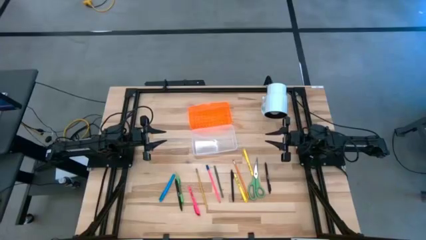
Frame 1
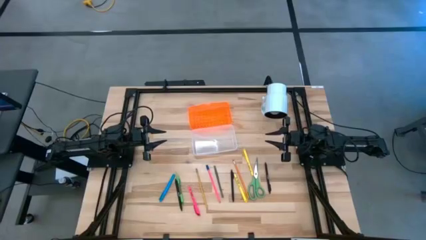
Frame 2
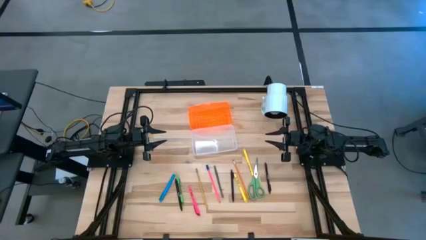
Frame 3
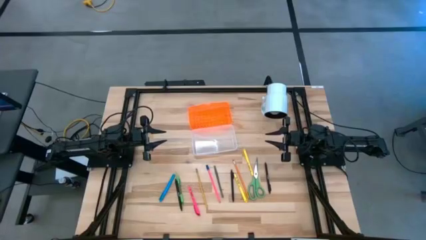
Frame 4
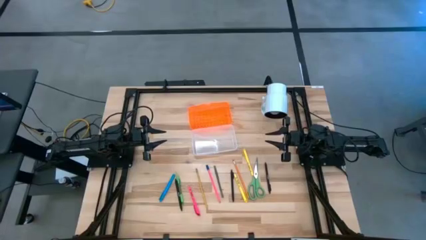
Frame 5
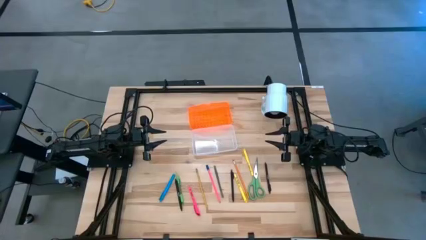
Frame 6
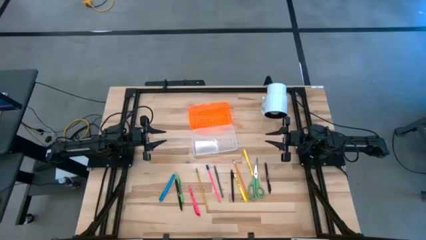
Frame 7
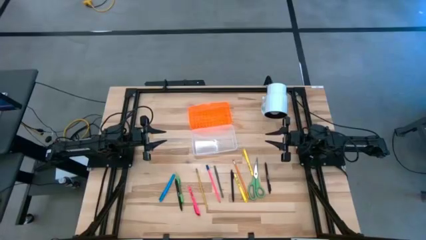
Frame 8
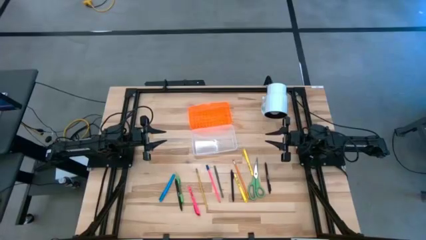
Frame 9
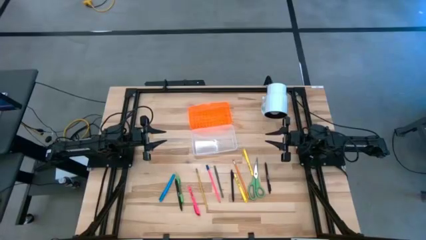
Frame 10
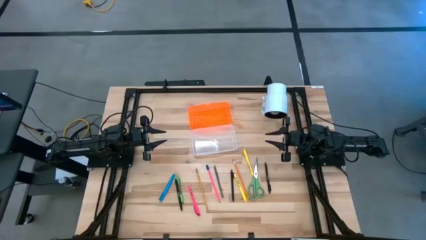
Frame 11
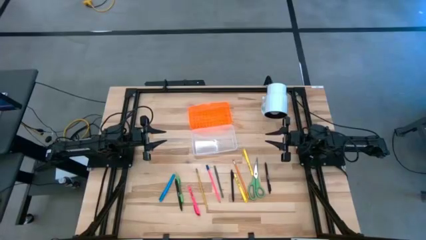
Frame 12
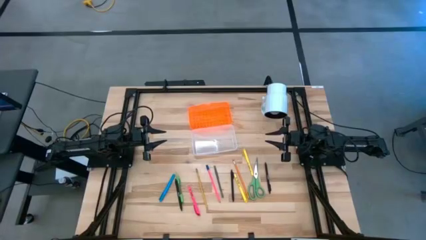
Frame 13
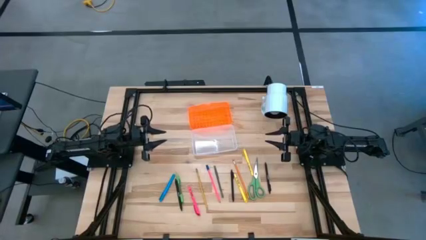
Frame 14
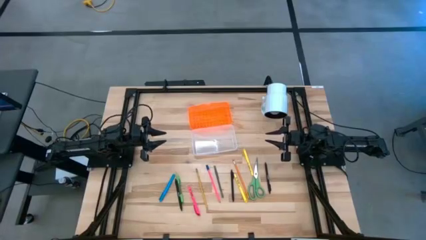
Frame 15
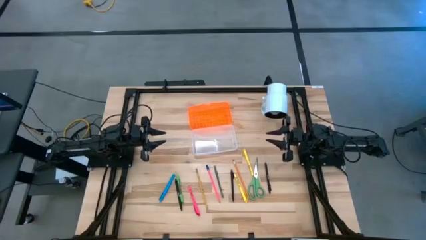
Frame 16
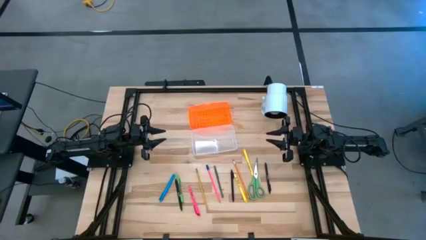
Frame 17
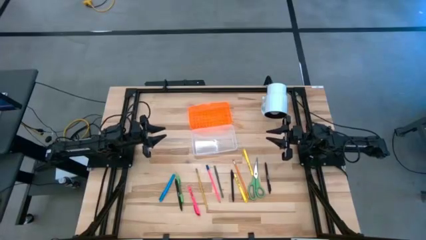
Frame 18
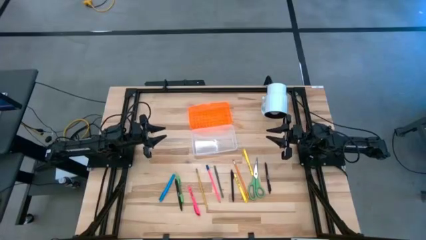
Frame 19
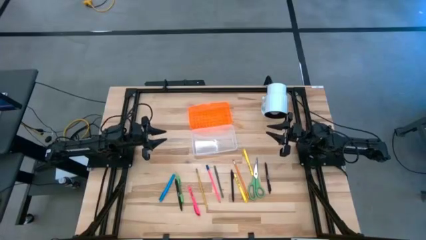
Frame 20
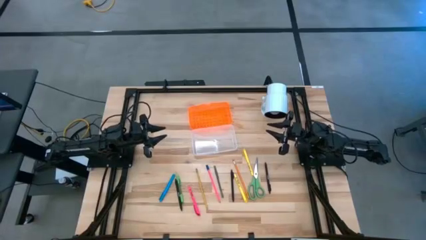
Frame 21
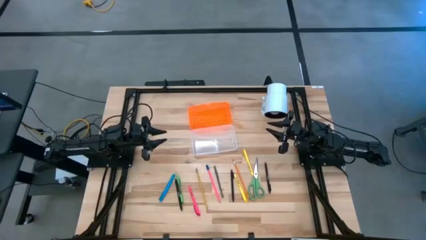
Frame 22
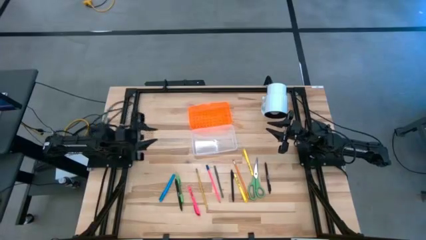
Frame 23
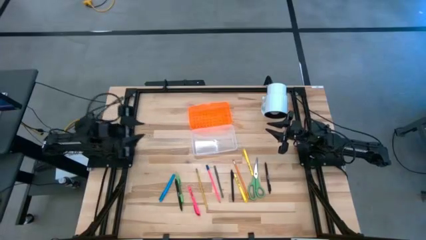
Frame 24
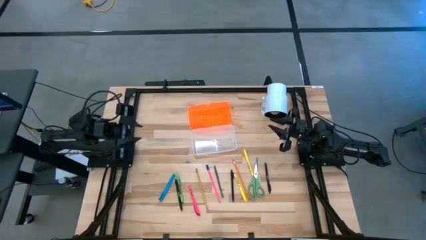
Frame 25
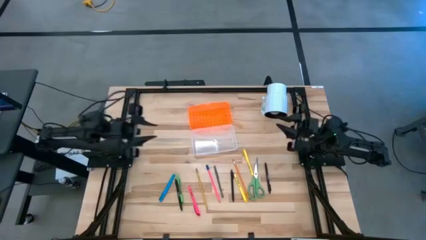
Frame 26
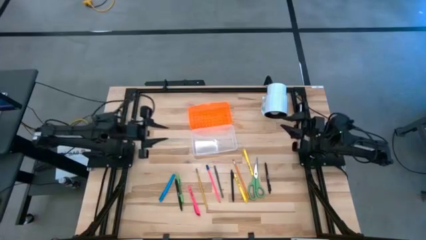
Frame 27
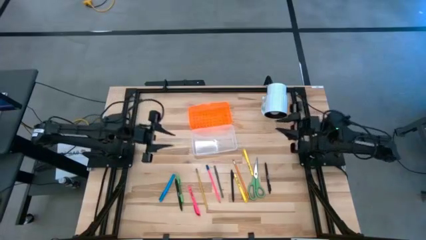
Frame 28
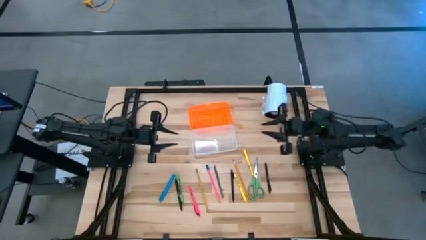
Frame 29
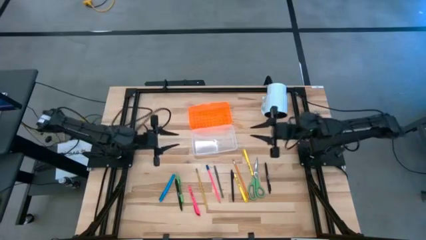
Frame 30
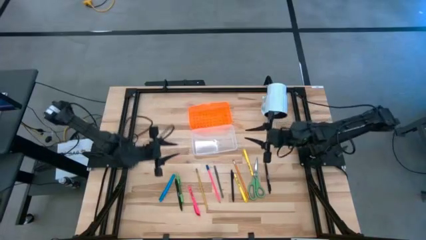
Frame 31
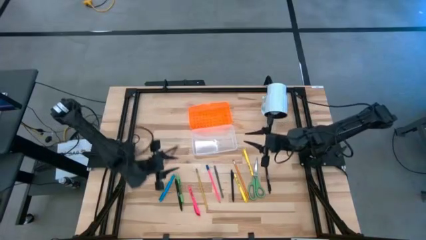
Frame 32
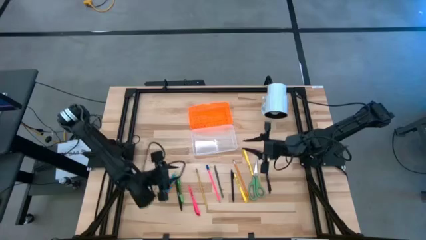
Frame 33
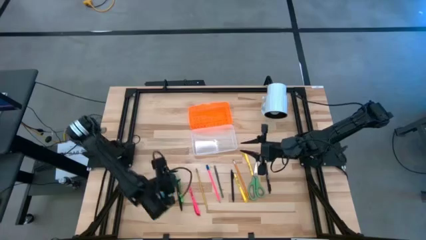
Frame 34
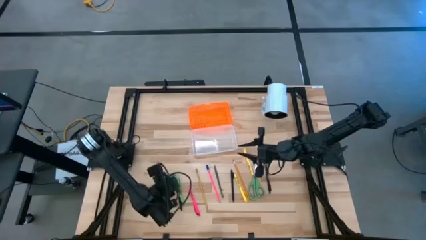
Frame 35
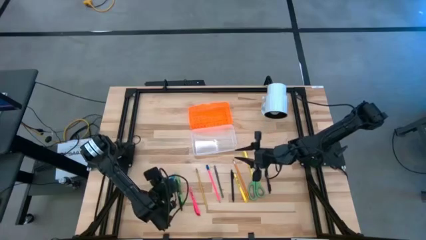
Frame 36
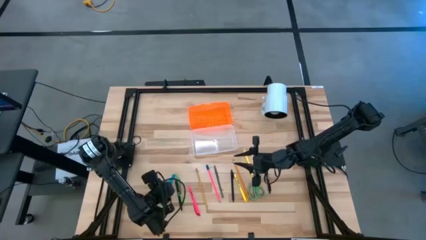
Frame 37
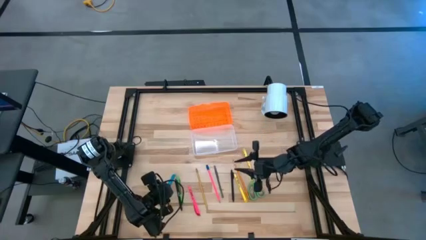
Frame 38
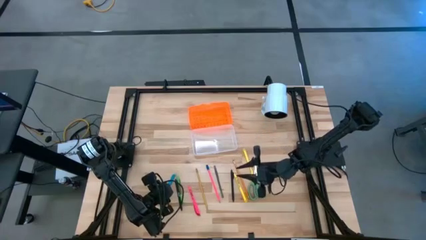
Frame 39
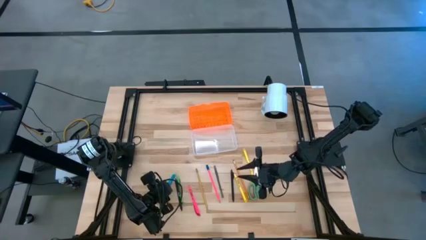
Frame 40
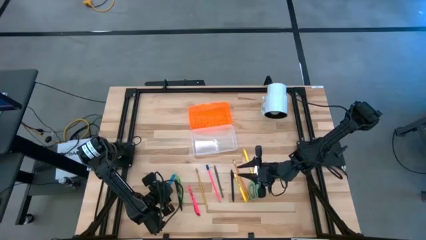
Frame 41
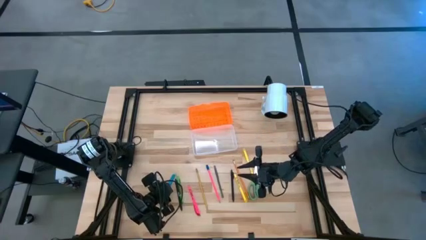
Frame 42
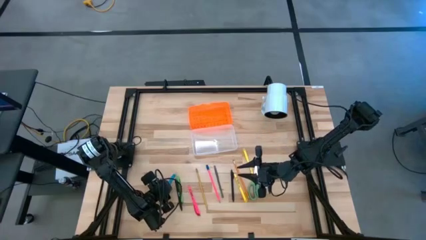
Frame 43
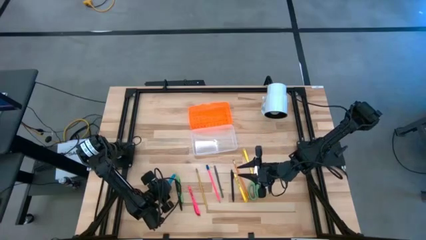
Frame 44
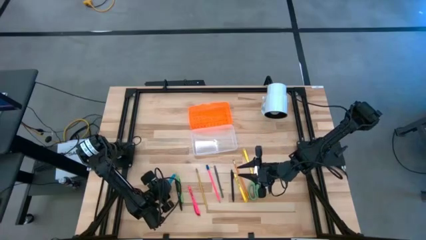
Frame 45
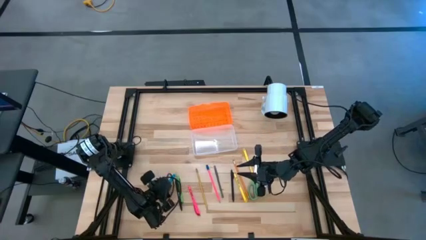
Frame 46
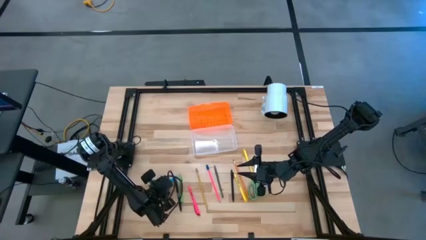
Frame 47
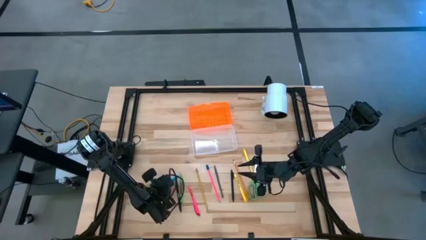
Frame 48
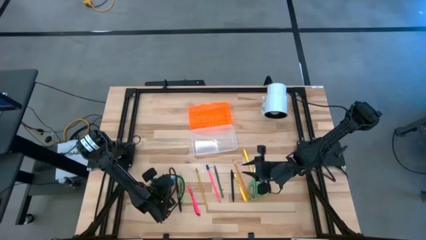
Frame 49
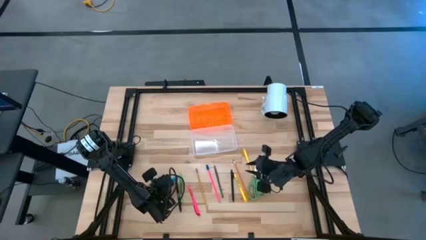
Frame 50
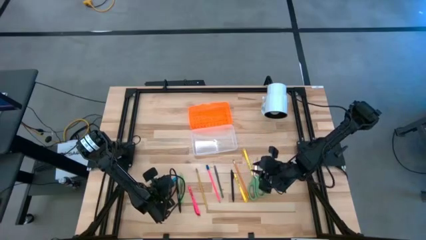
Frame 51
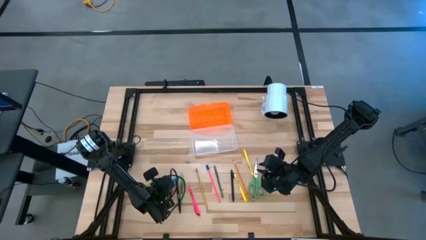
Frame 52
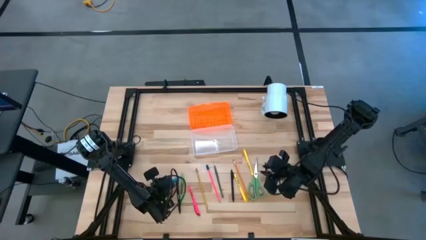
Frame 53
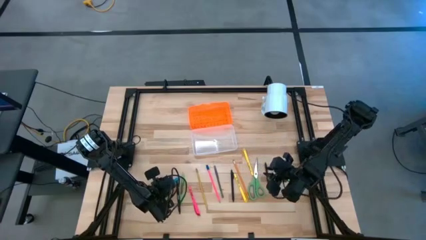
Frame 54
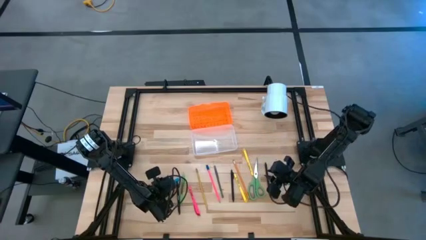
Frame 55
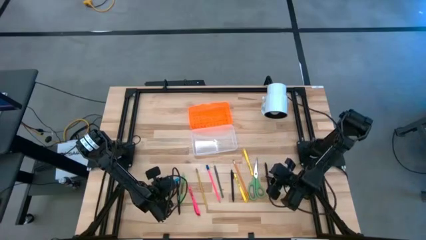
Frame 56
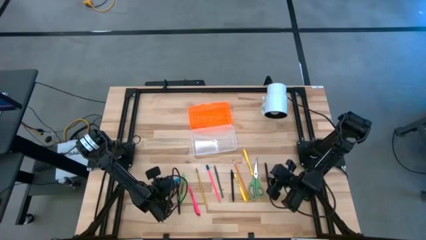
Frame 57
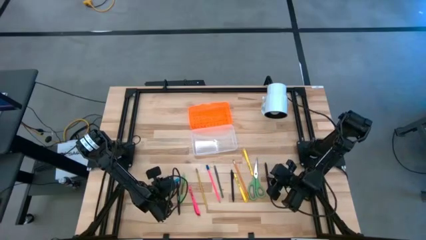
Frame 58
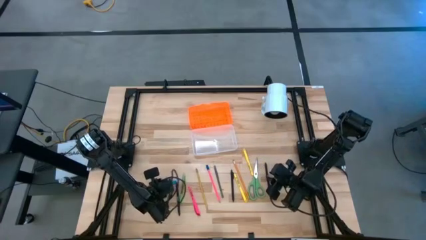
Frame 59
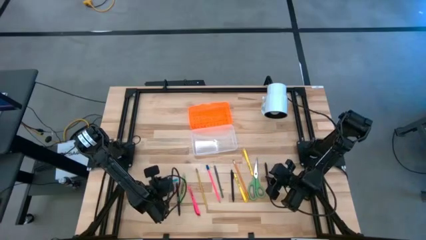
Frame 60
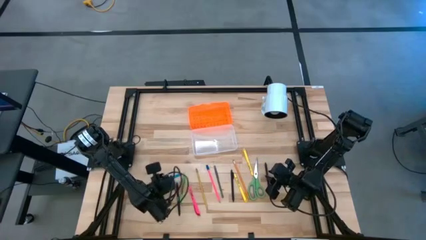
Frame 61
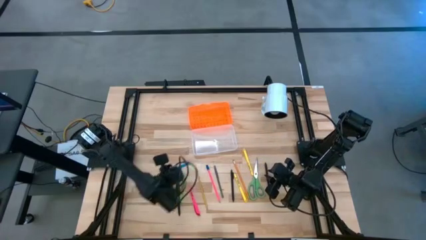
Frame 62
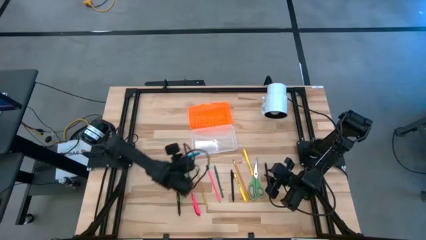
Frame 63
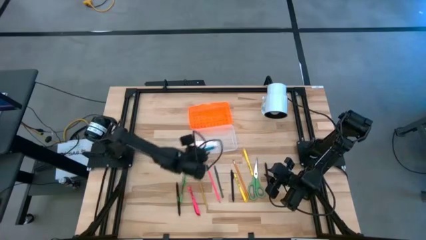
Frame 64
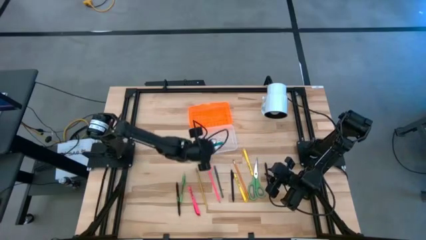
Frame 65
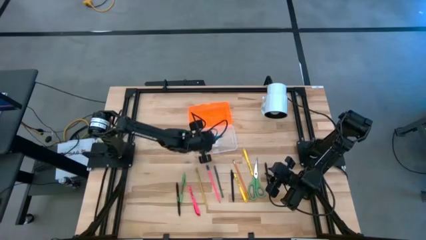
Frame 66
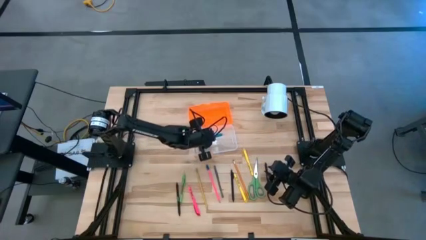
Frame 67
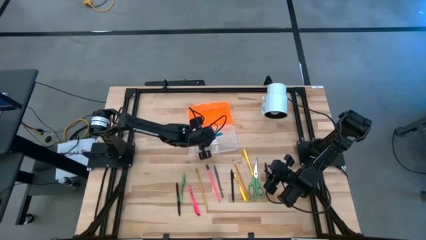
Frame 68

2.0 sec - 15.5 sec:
Task: Pick & place school supplies into a supply box
Put the blue pen into the supply box
